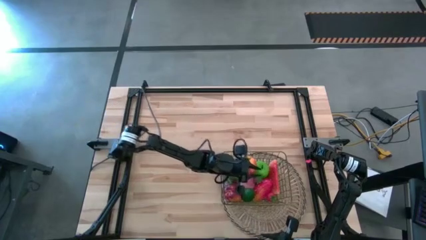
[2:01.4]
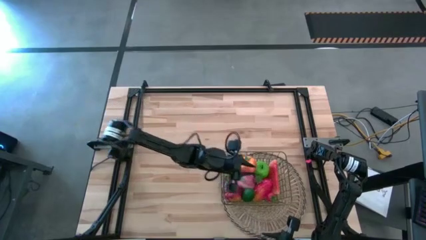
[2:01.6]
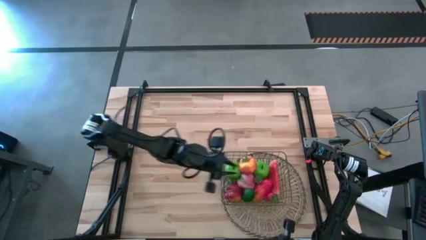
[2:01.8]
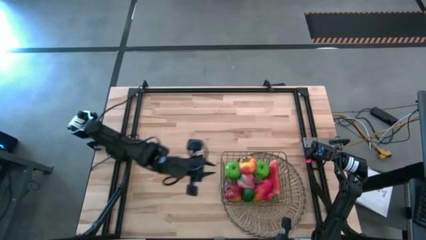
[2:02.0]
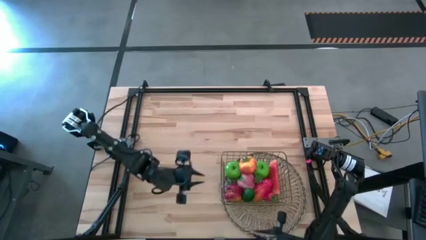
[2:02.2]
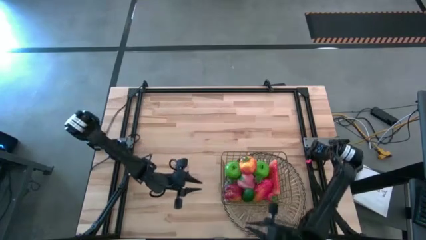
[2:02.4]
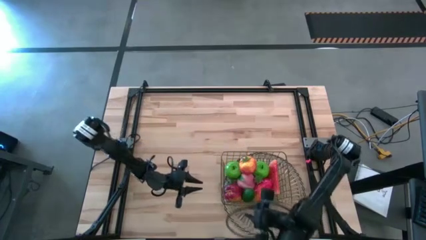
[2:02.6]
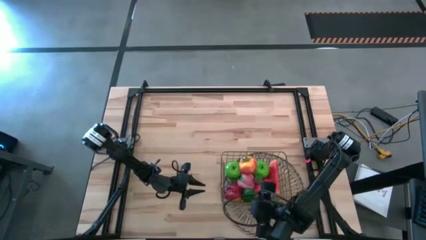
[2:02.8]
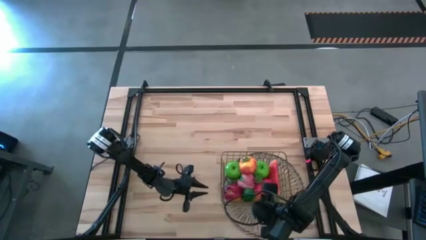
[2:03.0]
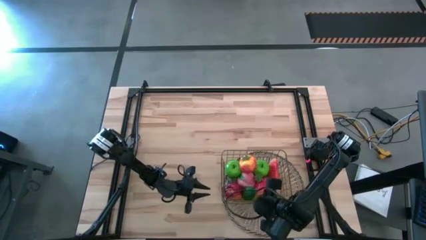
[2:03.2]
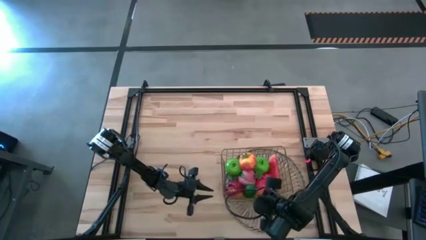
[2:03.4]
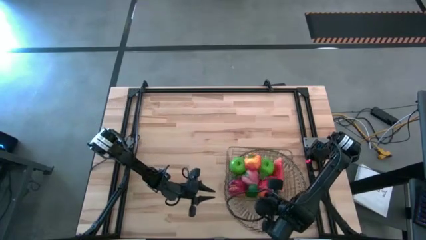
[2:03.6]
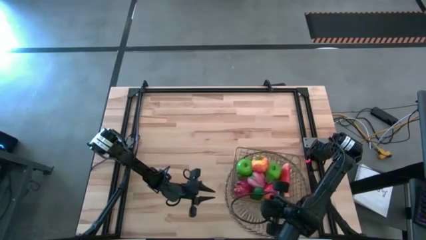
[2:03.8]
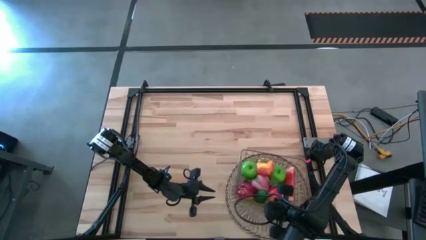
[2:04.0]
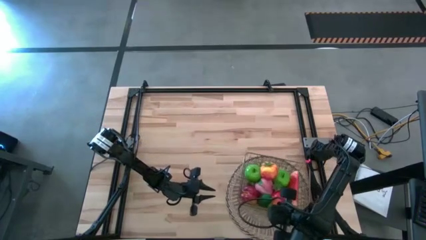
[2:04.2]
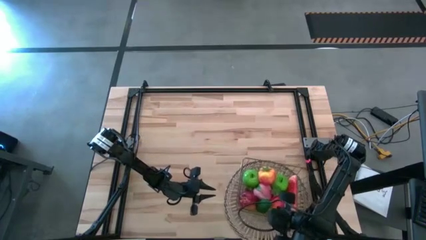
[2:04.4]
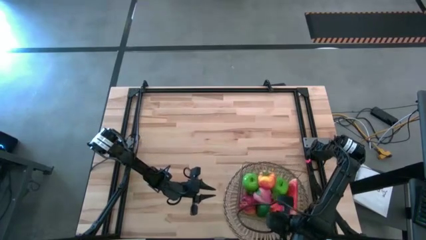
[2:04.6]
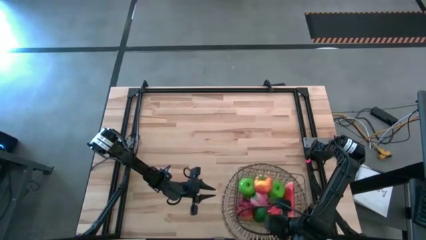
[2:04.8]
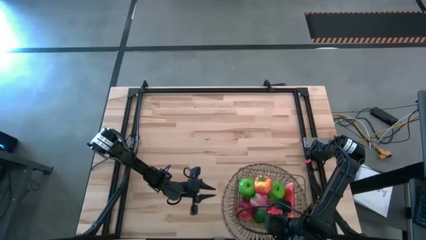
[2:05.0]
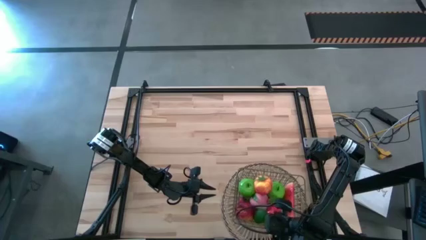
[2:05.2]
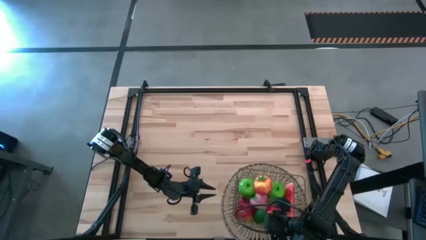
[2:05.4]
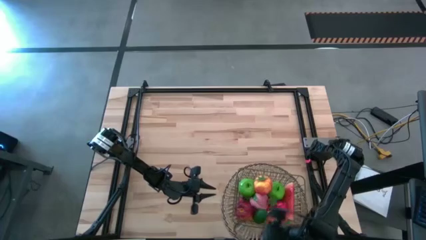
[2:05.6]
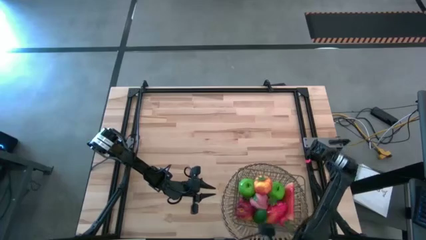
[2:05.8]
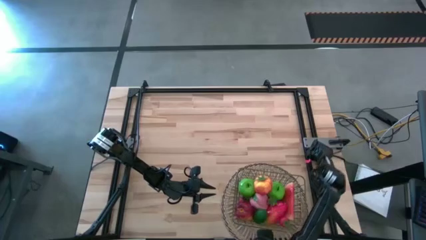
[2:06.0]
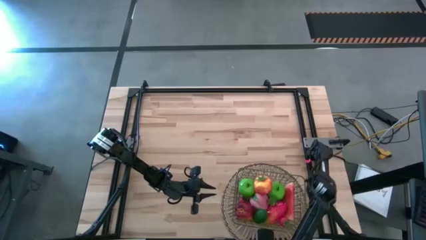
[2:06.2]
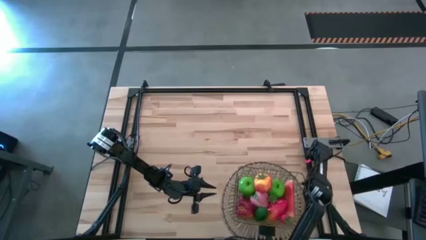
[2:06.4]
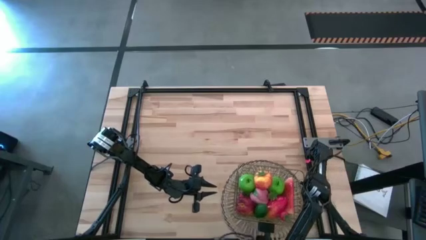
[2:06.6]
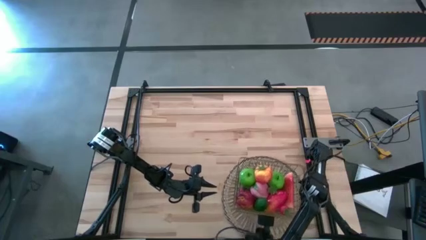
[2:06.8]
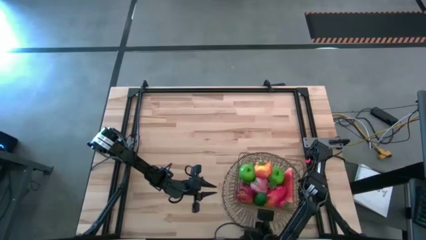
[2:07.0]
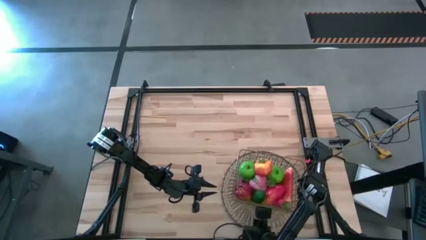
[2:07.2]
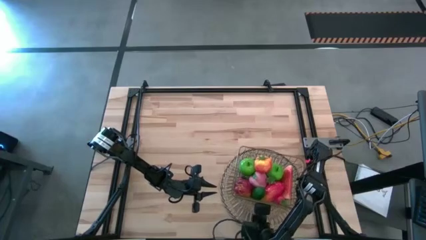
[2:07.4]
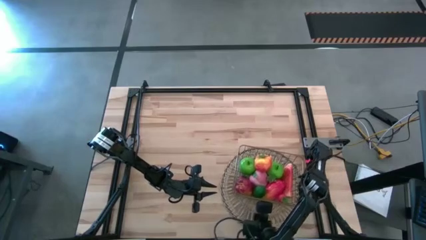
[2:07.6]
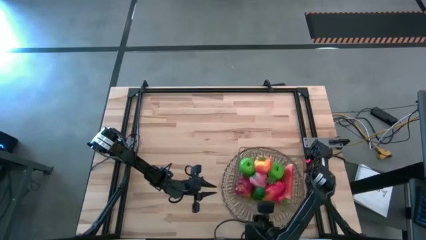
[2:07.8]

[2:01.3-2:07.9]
Task: Build produce basket
Adjust the wire basket on the table

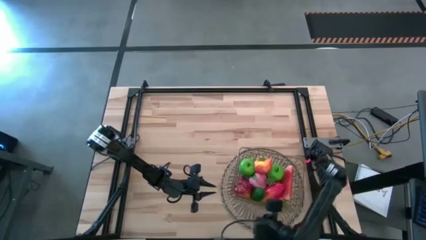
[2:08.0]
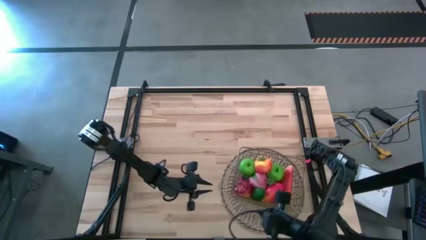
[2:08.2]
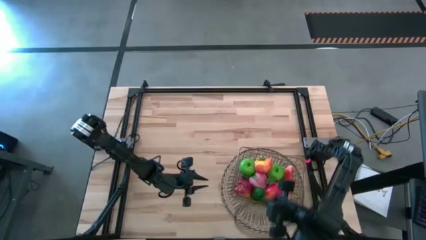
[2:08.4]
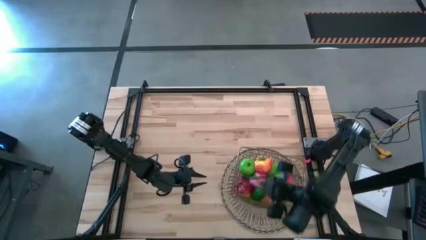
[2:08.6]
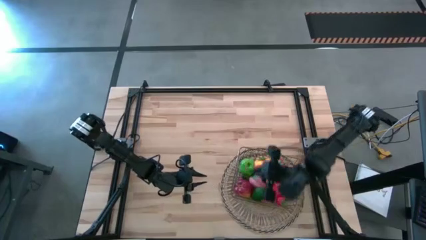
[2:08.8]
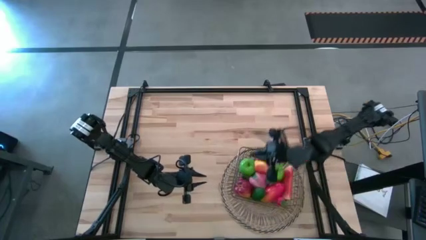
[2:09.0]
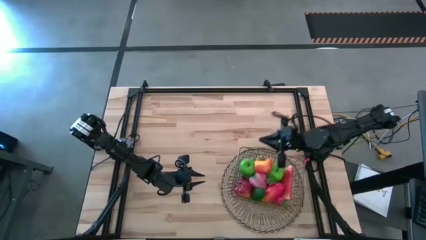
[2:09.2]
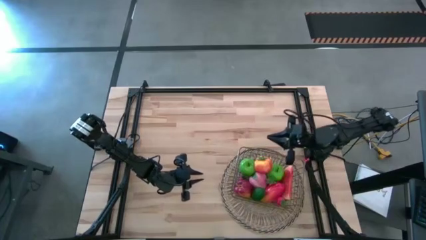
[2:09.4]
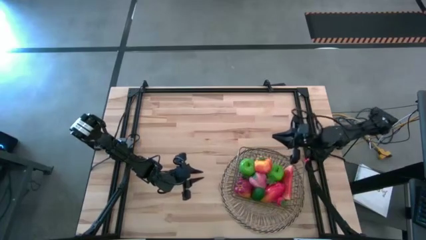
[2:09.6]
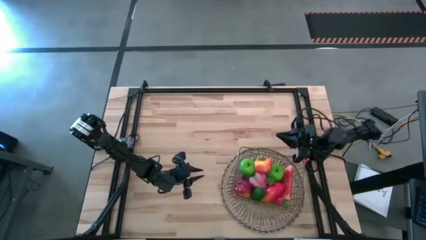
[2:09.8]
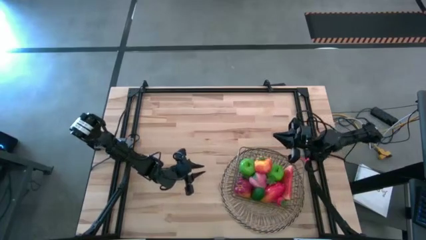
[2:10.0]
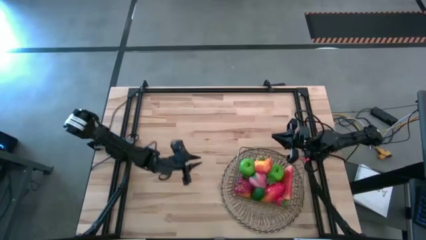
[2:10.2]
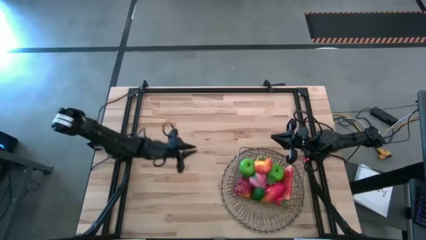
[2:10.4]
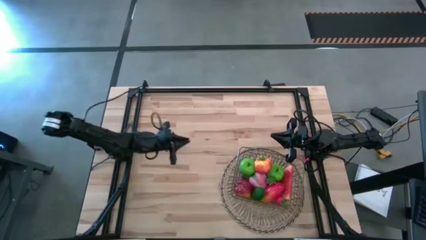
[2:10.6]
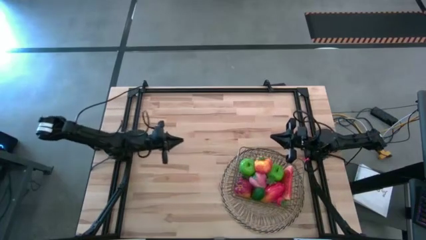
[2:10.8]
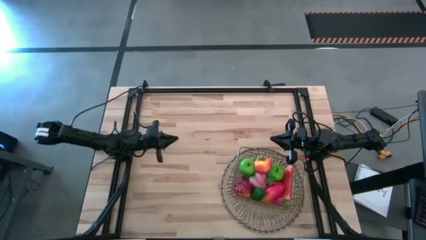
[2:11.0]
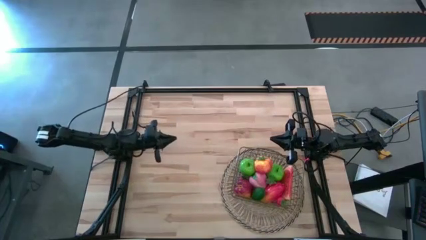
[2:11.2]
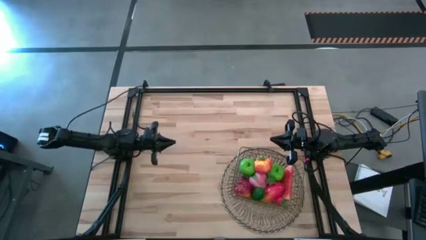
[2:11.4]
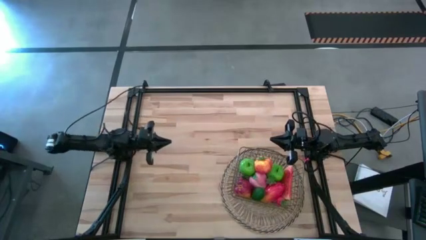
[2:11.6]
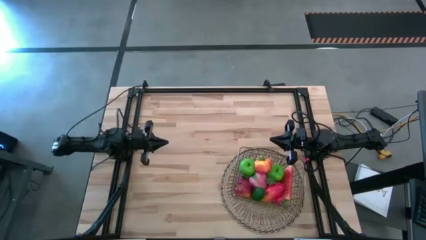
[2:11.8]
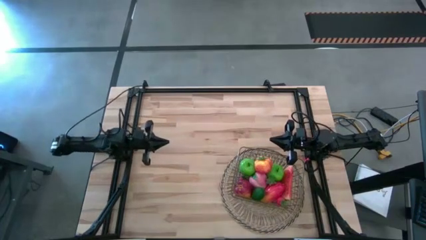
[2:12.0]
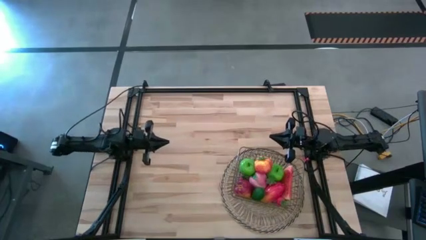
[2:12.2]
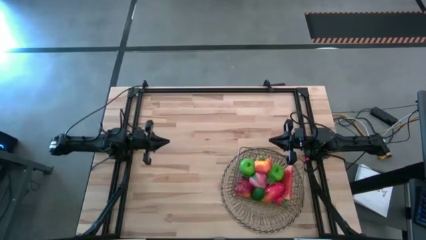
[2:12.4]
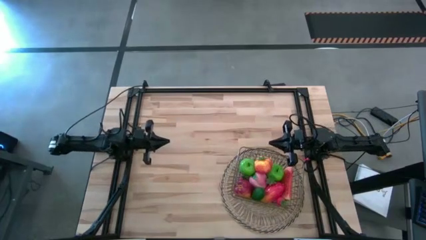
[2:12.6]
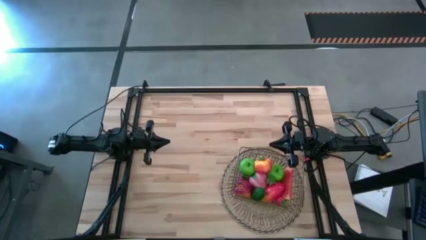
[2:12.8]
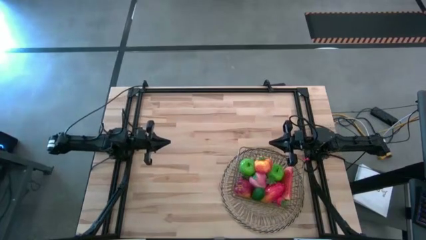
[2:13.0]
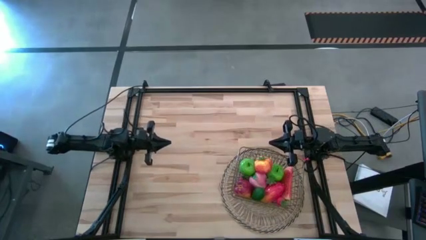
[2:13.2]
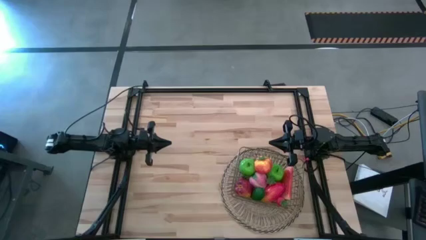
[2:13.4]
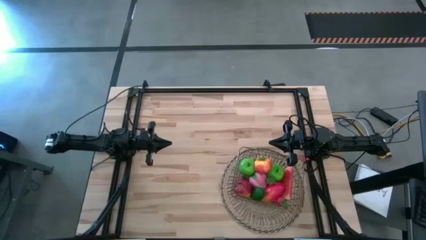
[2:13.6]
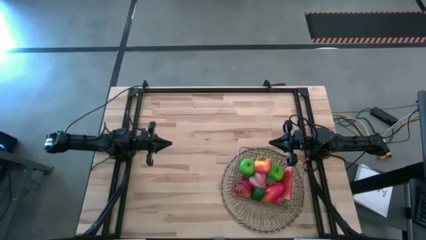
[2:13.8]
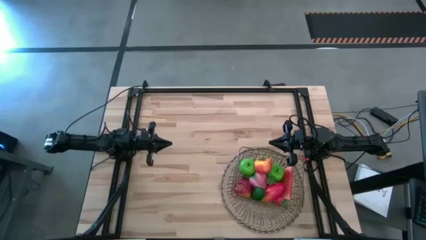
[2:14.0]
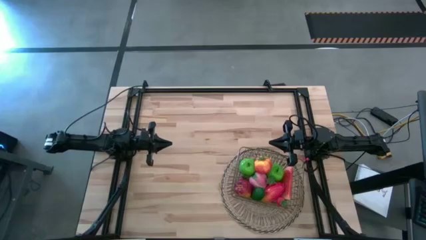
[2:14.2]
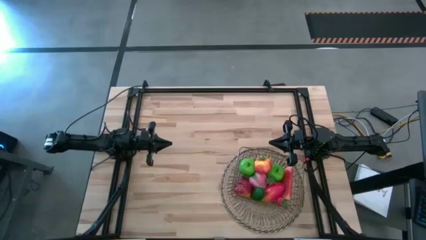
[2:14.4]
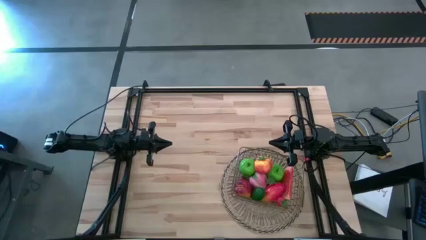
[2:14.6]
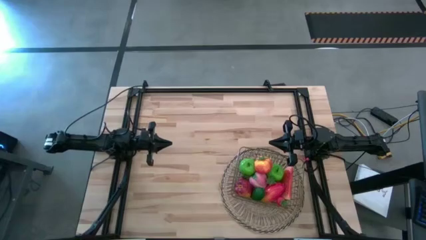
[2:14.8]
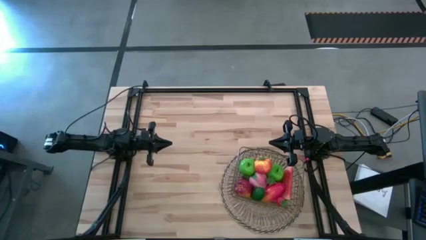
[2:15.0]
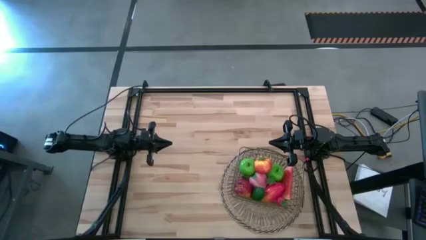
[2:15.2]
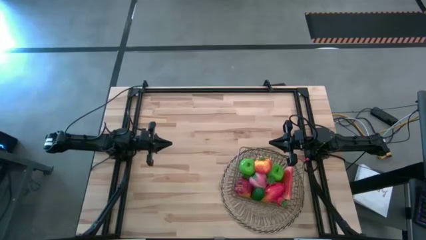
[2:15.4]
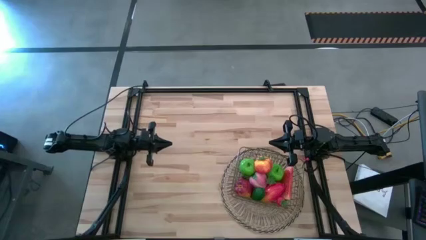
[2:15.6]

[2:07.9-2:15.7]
Return to Home Position
